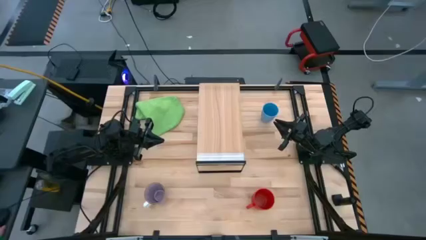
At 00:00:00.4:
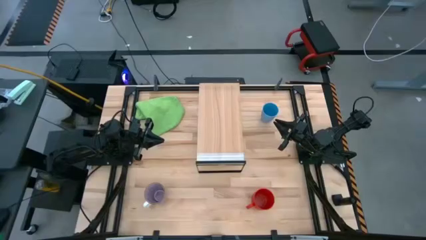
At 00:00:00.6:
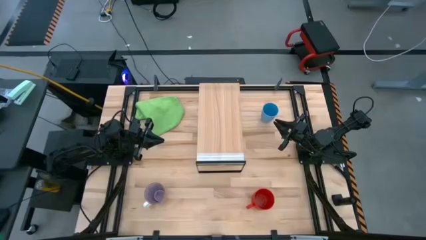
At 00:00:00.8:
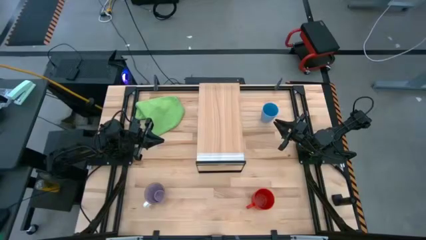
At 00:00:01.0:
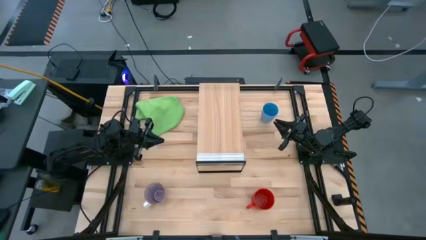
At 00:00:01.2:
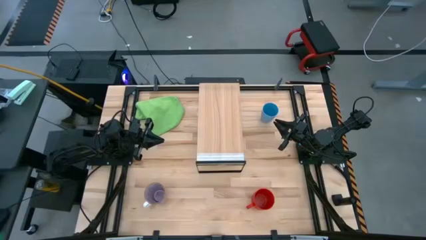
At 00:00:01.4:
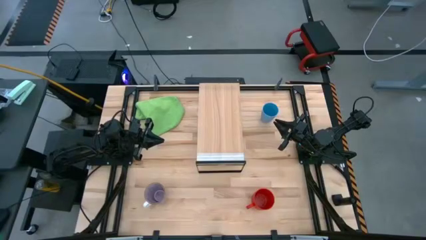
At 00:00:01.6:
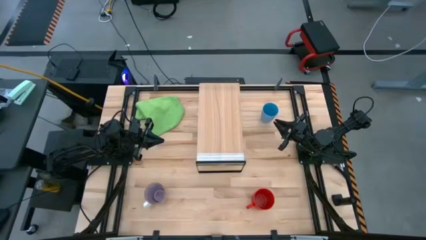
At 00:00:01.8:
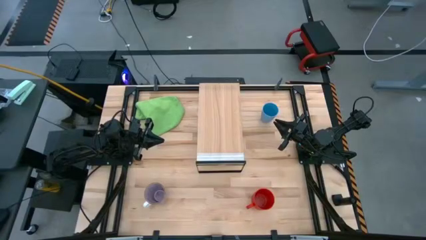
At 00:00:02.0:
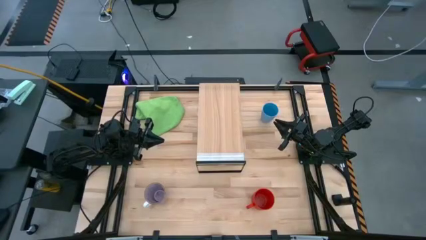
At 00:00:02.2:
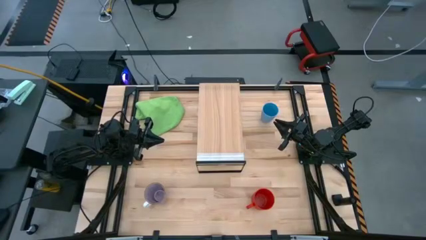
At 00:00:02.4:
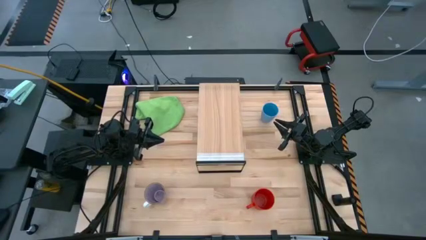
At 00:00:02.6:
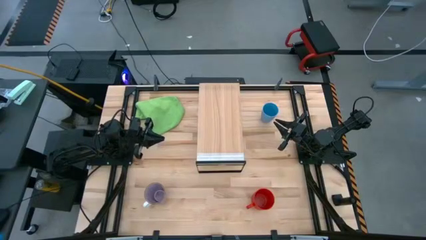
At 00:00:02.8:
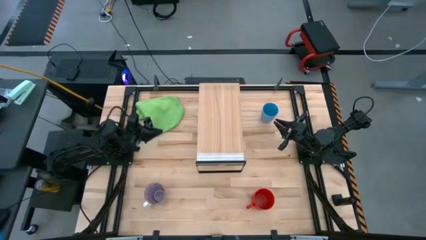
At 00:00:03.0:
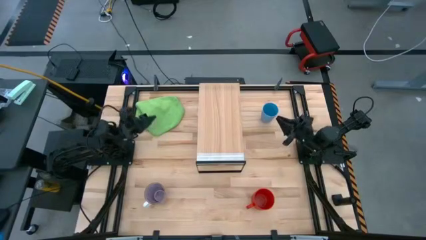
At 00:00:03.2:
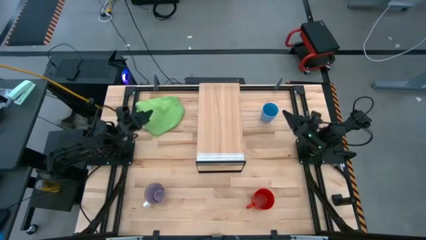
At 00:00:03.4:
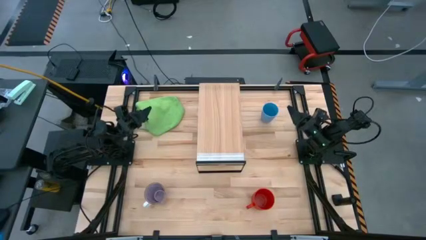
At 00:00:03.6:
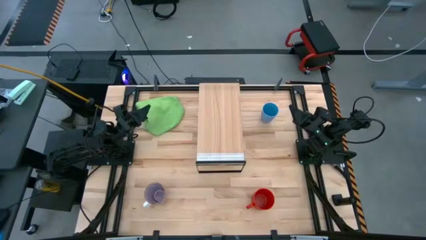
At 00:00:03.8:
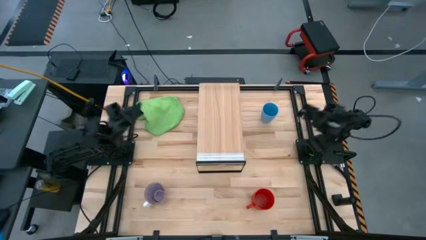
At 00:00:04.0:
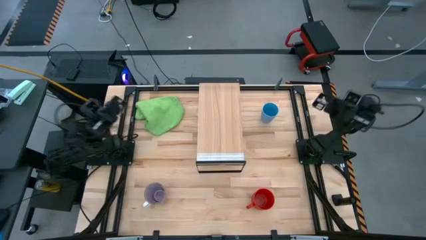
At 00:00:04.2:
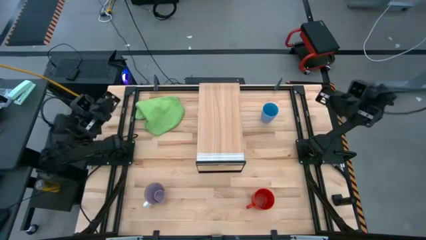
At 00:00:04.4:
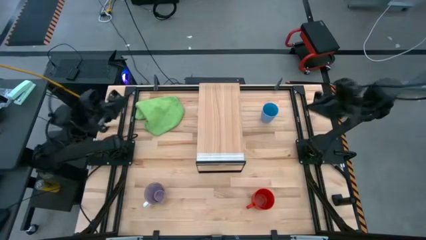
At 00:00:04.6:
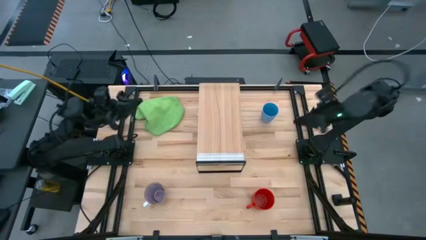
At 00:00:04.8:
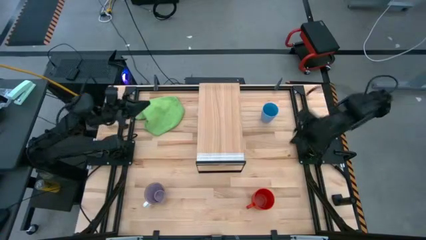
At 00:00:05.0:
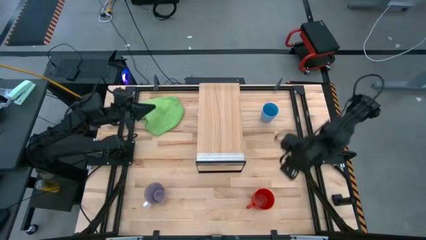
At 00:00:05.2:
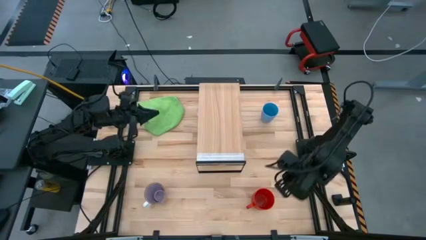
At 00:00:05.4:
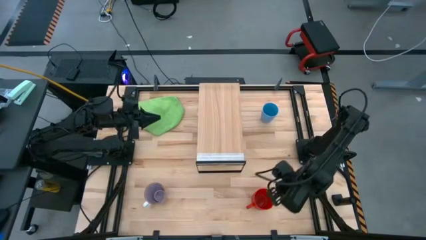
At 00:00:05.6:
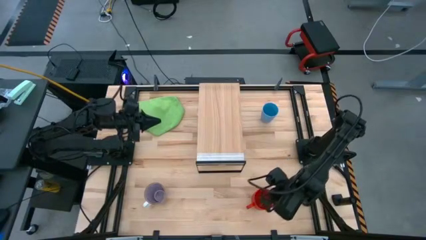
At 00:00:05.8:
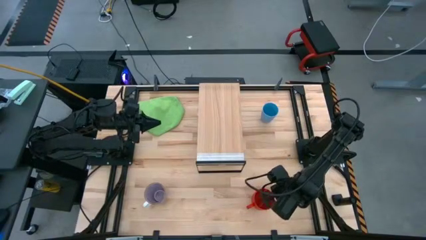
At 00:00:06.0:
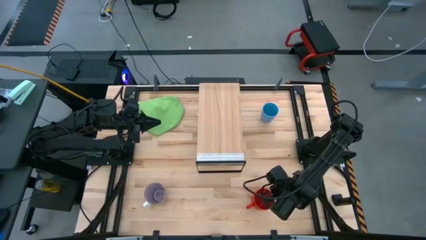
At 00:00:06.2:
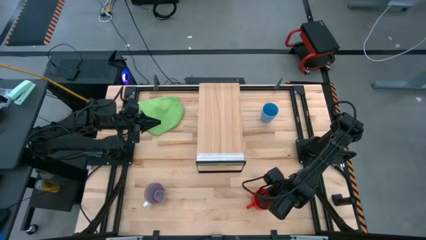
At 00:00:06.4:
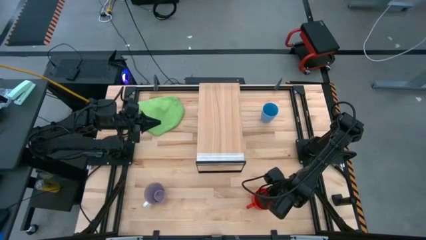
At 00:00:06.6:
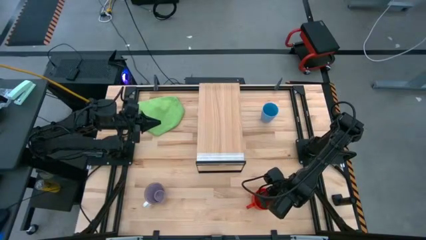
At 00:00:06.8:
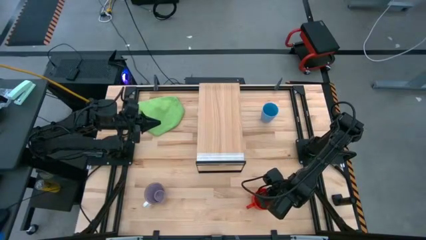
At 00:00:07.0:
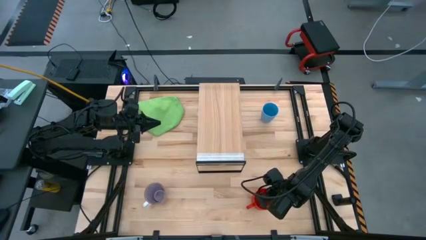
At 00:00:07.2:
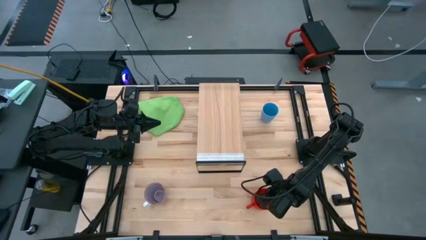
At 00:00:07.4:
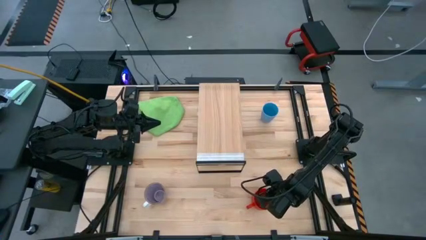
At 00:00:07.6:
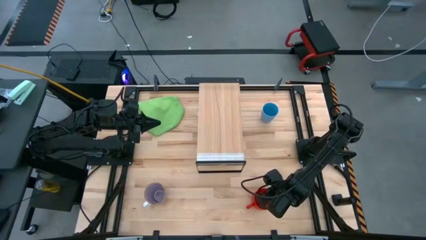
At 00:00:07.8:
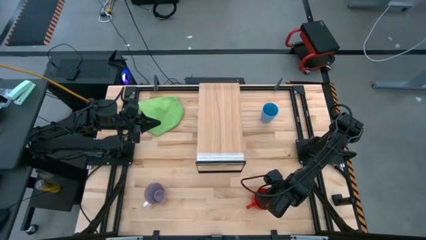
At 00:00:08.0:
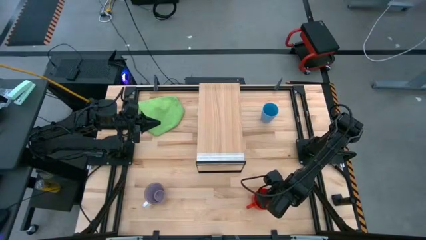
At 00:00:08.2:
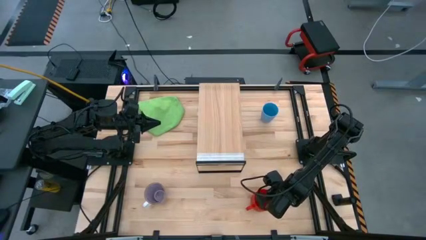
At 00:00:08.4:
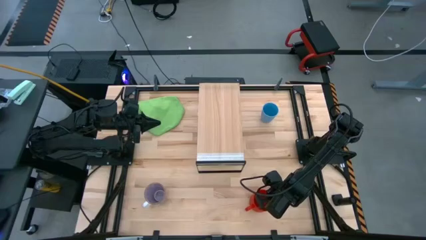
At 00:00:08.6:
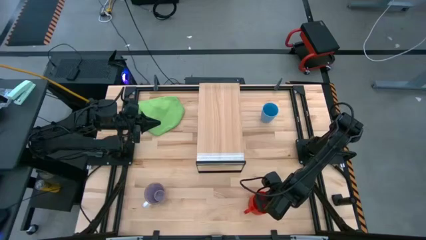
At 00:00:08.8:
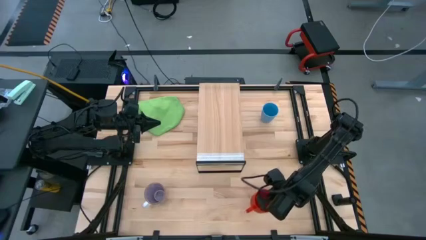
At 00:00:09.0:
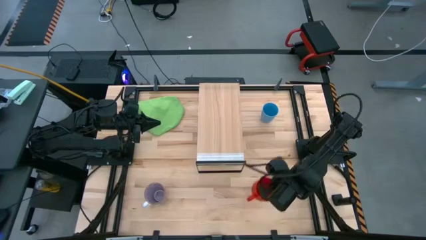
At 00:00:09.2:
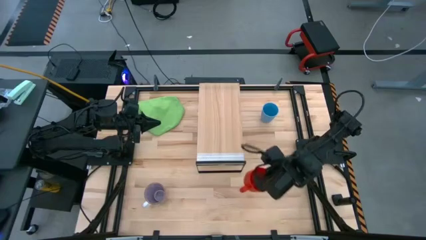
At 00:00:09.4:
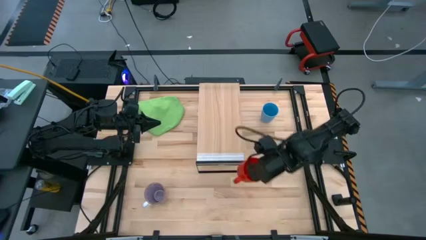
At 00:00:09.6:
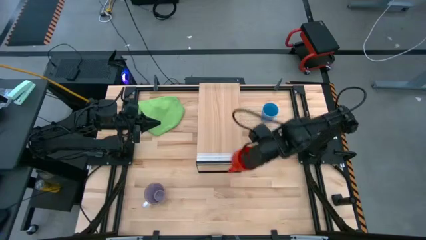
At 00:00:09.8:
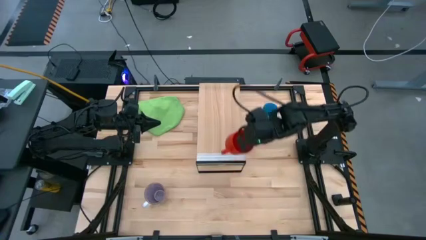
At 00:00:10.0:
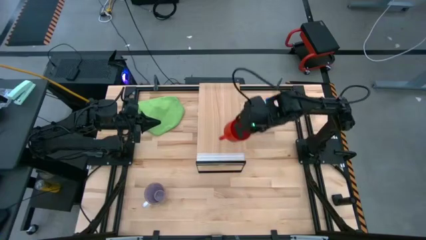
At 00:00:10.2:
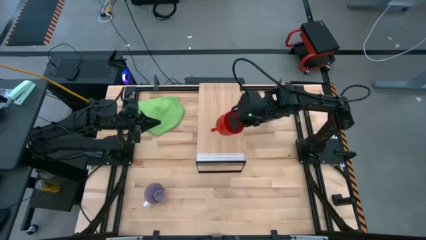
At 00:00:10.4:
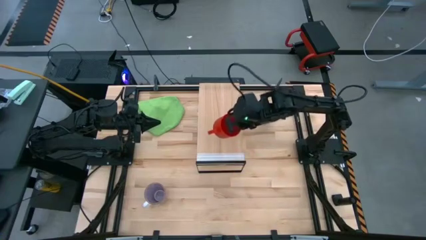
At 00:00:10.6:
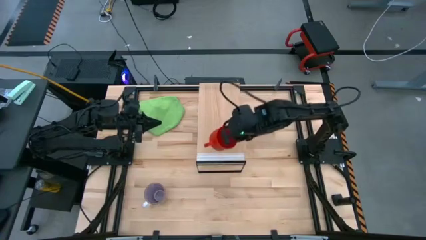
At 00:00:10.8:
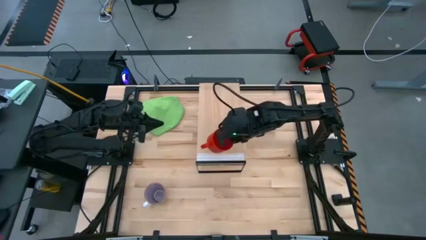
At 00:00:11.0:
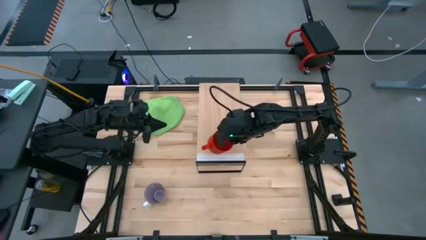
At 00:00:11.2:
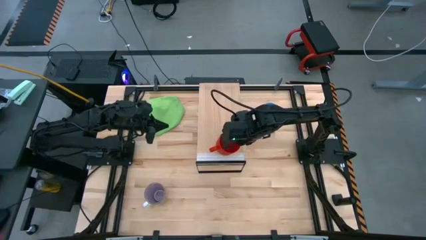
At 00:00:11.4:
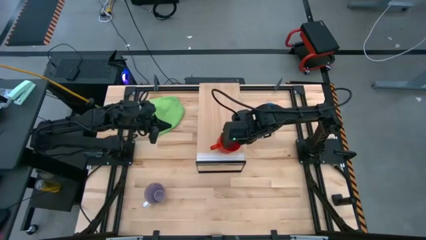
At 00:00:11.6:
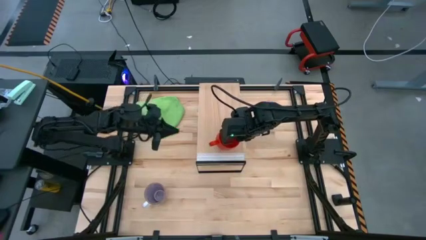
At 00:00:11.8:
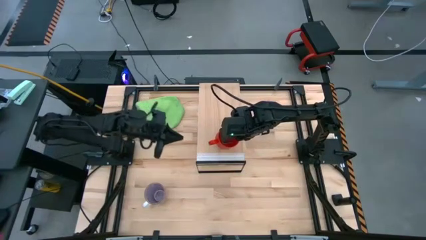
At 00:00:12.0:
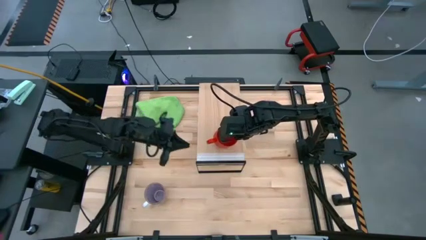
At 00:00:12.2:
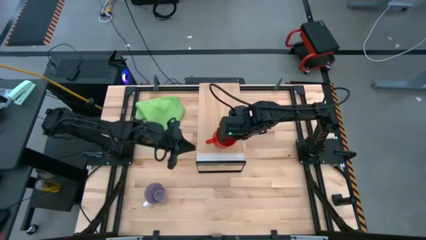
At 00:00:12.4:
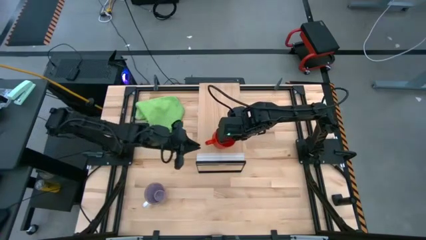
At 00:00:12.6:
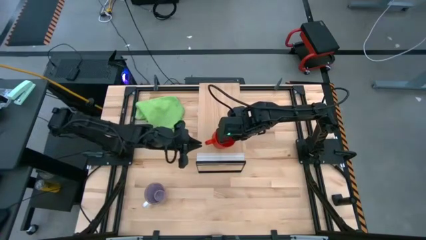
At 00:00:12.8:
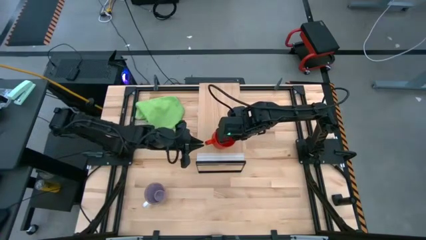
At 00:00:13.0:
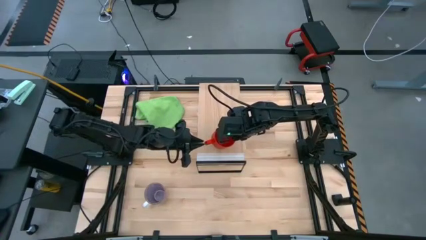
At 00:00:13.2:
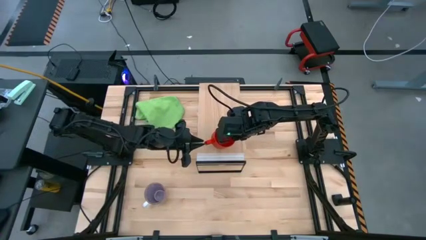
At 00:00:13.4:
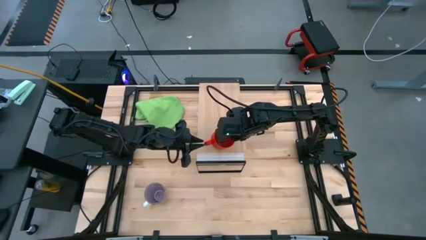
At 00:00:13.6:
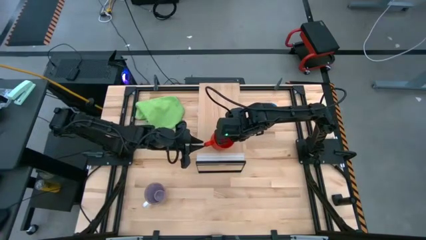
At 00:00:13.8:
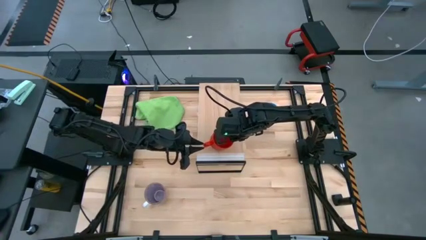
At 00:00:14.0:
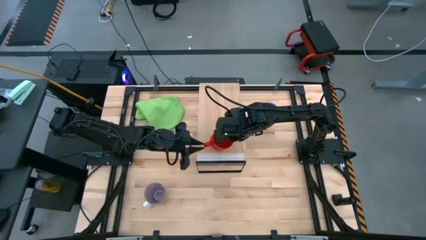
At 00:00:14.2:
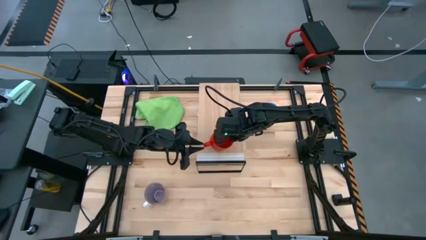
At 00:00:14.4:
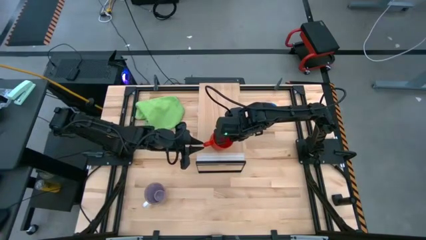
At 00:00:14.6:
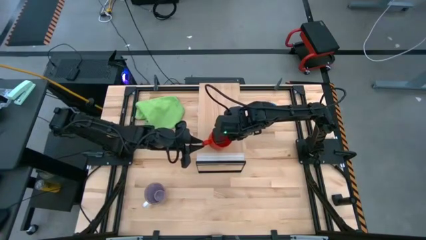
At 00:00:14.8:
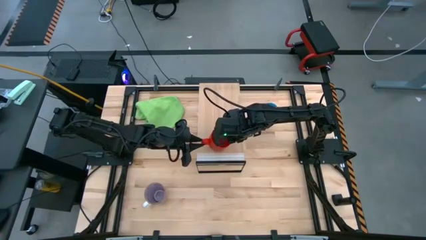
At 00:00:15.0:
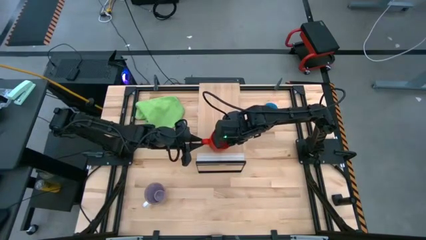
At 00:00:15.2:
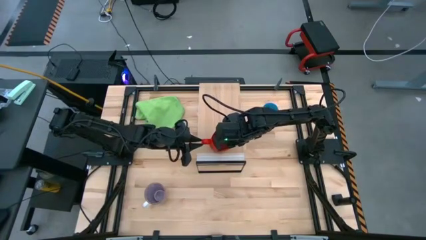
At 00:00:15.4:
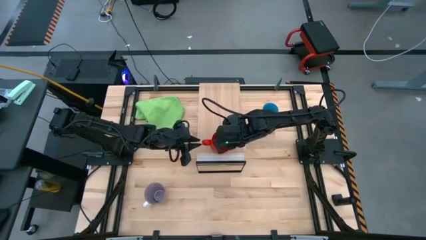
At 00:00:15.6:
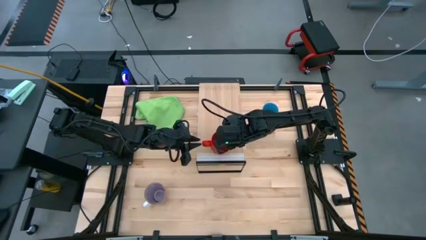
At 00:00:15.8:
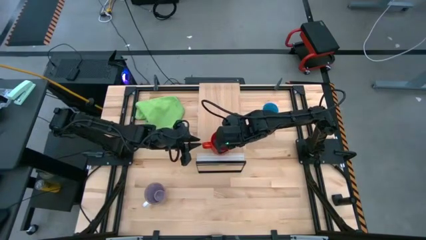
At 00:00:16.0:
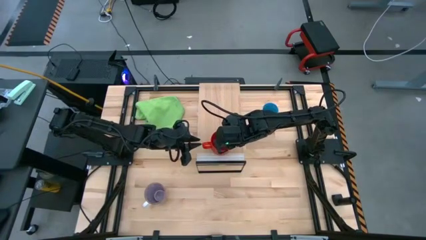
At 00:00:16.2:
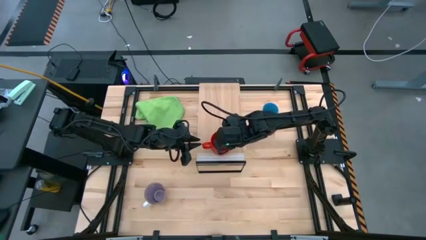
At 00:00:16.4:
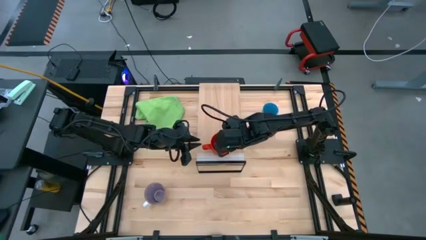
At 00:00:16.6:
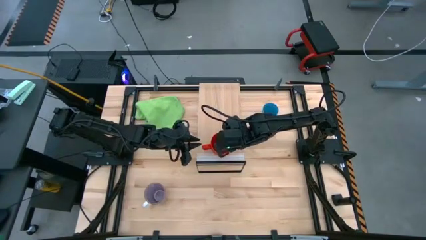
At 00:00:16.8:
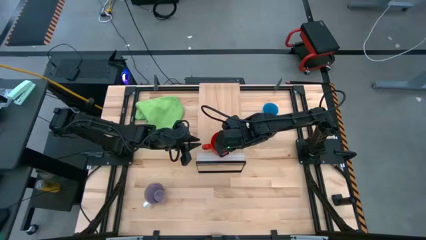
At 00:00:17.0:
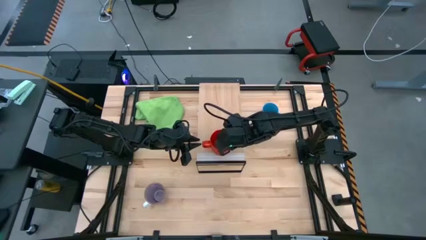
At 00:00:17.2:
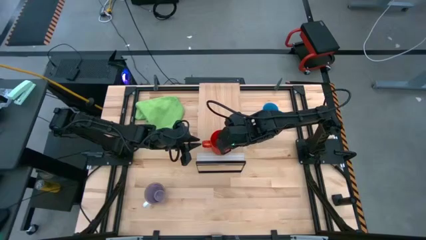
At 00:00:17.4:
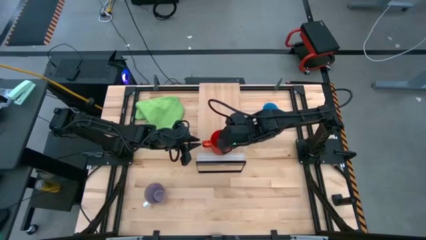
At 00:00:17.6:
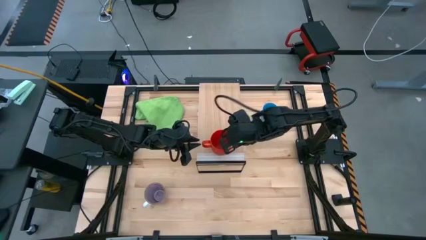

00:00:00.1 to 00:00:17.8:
Task: Stack small to large cups/mugs on shelf
Put the red mug on the shelf
